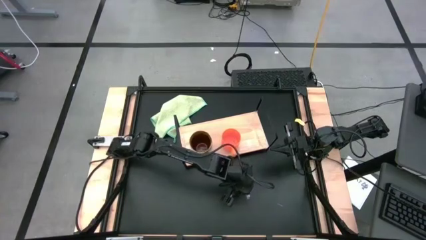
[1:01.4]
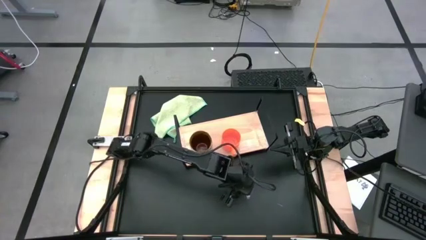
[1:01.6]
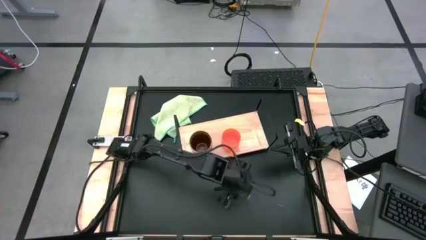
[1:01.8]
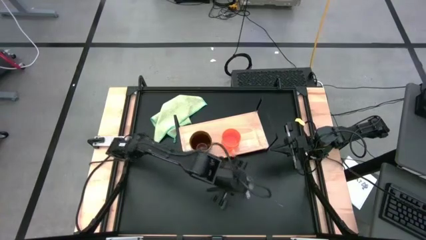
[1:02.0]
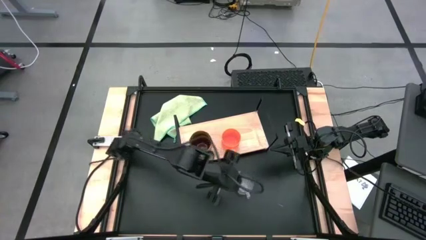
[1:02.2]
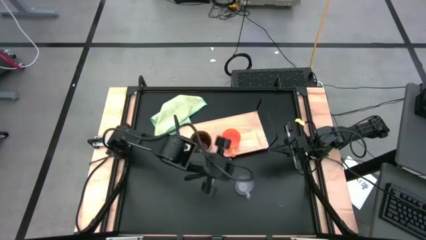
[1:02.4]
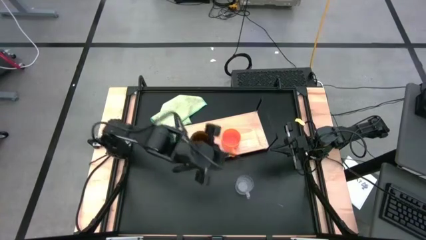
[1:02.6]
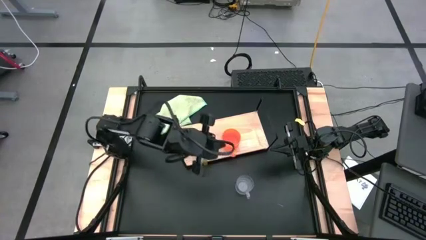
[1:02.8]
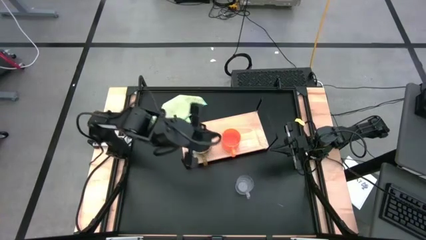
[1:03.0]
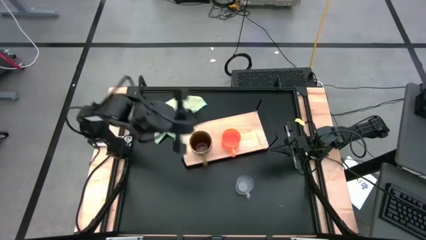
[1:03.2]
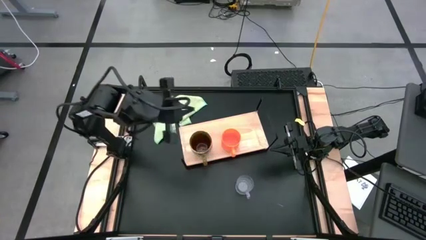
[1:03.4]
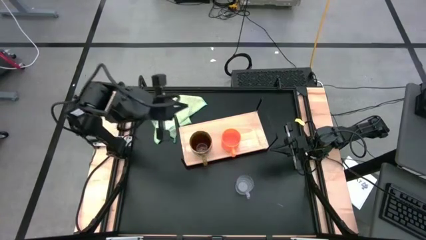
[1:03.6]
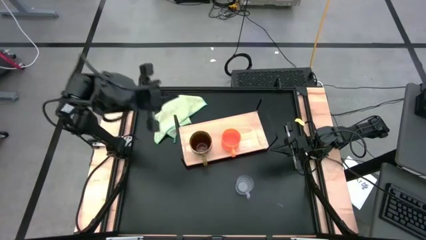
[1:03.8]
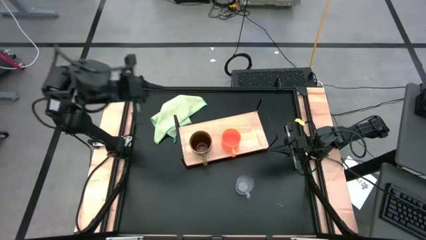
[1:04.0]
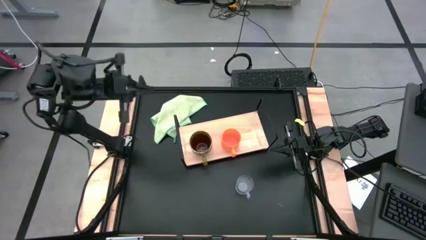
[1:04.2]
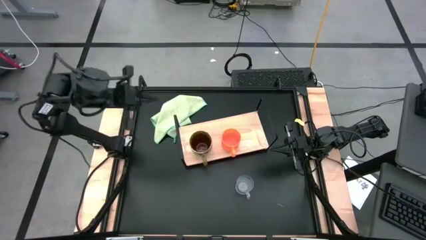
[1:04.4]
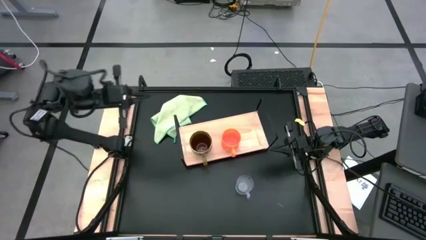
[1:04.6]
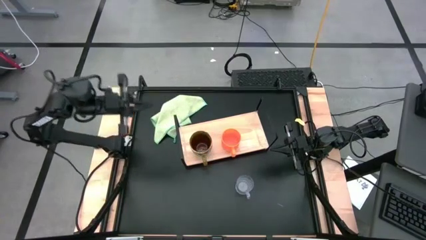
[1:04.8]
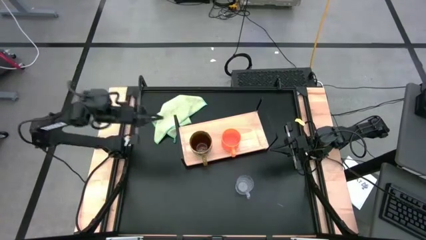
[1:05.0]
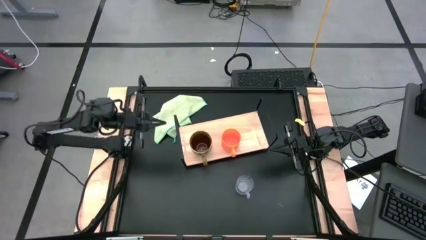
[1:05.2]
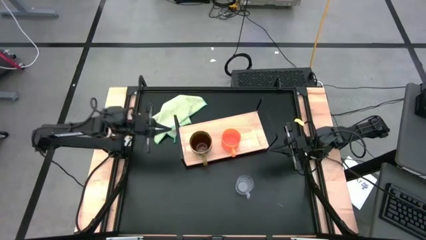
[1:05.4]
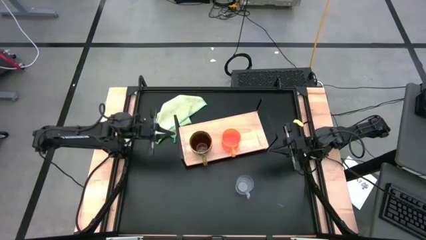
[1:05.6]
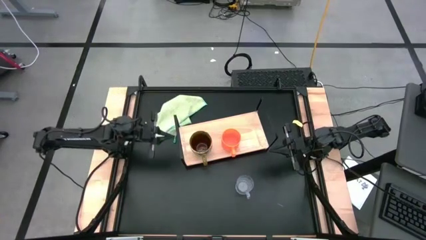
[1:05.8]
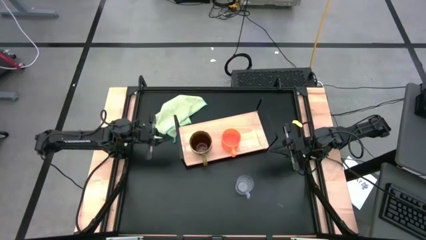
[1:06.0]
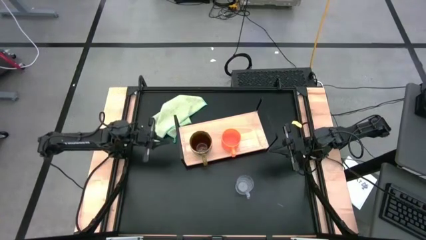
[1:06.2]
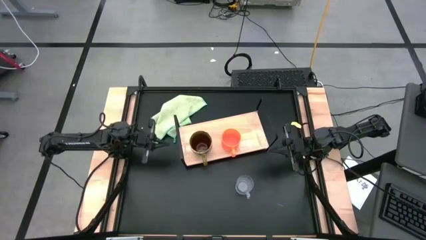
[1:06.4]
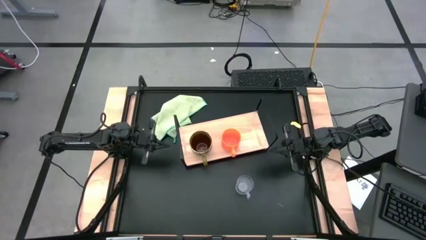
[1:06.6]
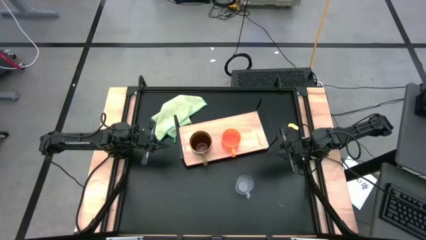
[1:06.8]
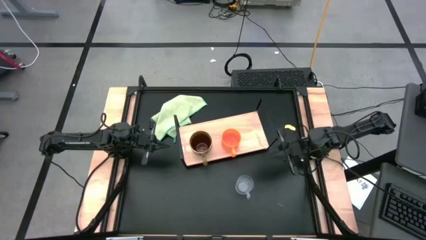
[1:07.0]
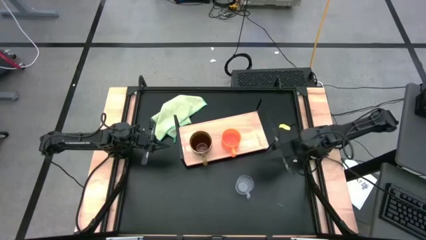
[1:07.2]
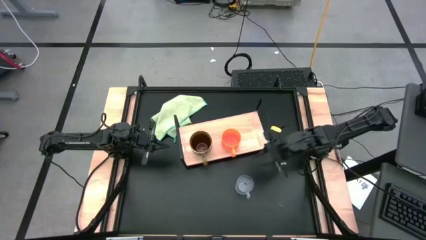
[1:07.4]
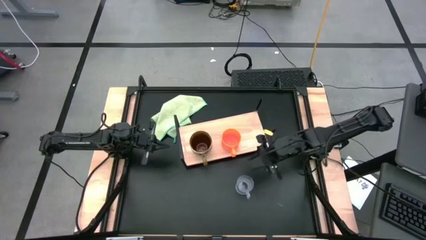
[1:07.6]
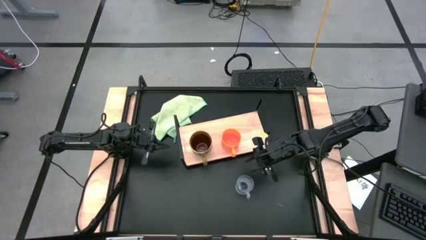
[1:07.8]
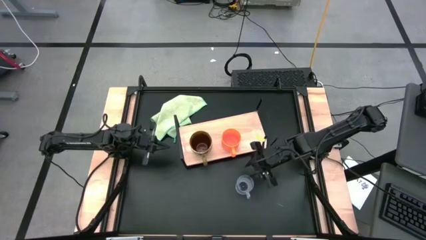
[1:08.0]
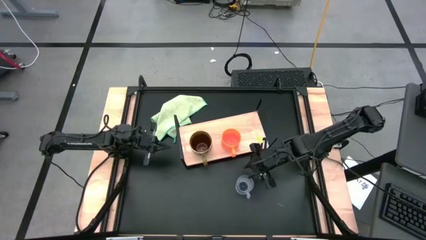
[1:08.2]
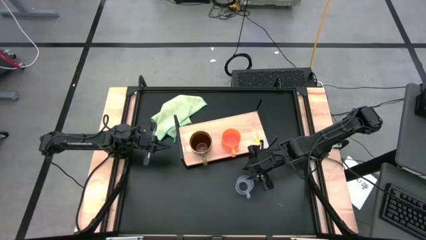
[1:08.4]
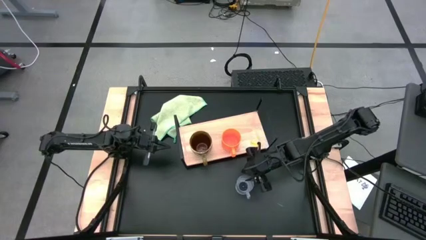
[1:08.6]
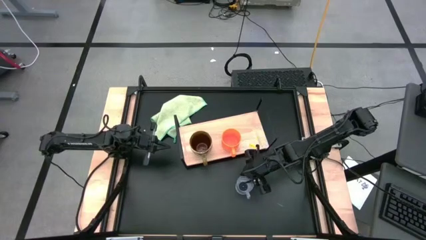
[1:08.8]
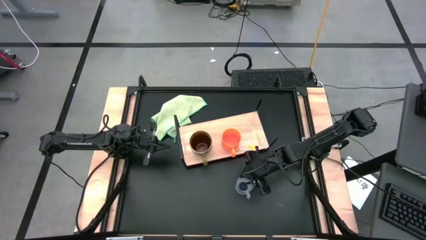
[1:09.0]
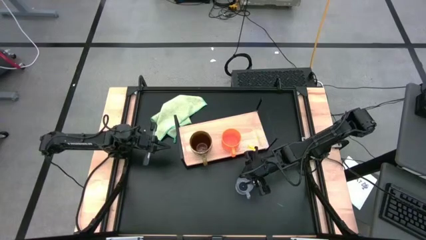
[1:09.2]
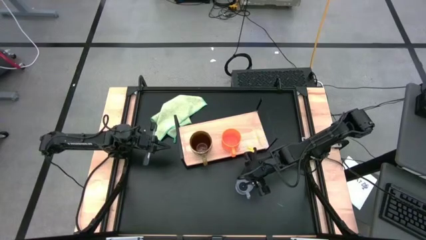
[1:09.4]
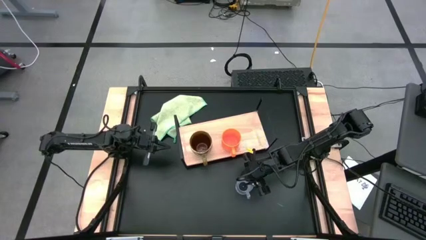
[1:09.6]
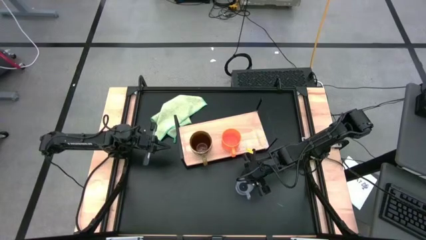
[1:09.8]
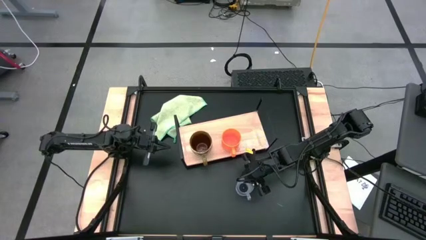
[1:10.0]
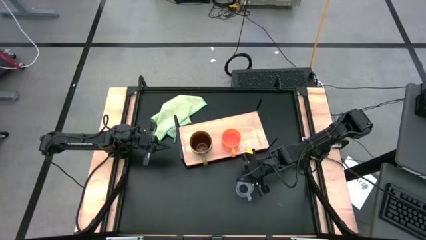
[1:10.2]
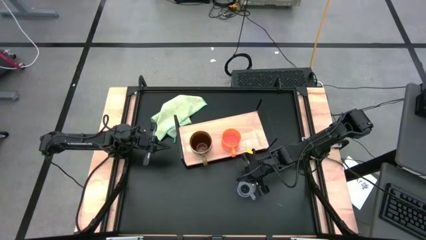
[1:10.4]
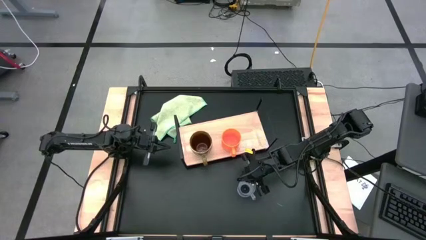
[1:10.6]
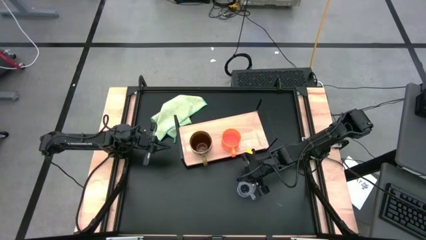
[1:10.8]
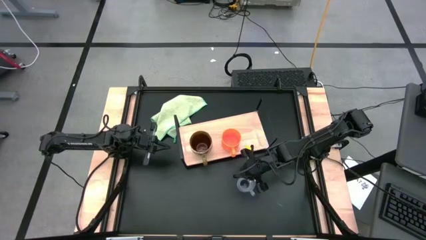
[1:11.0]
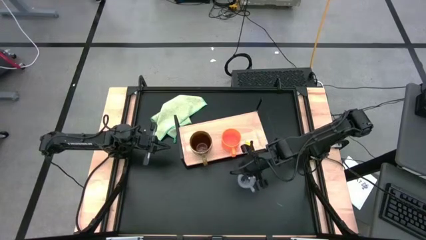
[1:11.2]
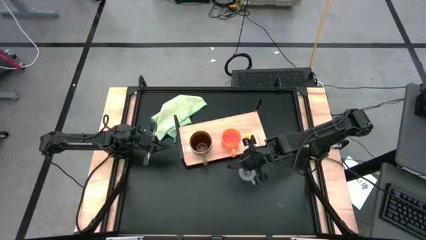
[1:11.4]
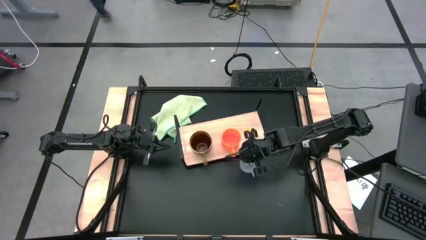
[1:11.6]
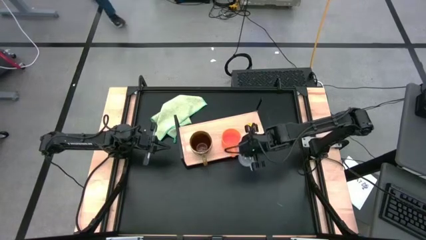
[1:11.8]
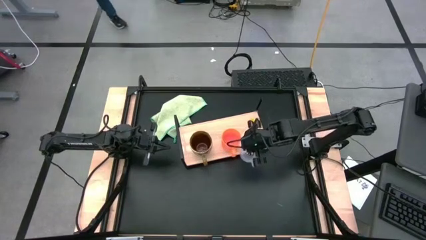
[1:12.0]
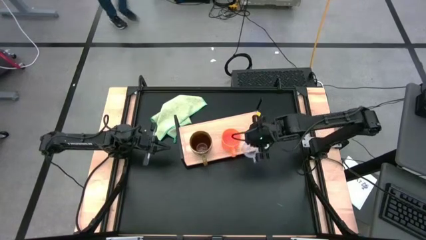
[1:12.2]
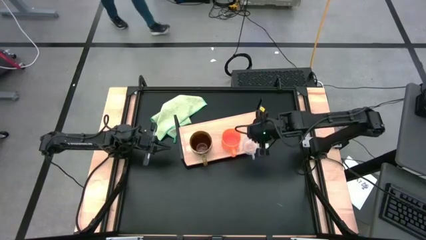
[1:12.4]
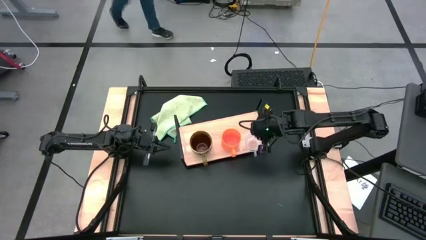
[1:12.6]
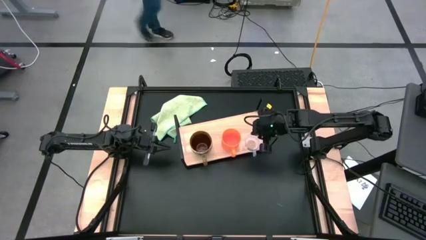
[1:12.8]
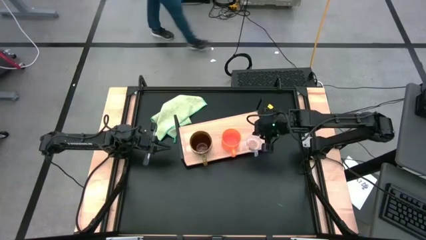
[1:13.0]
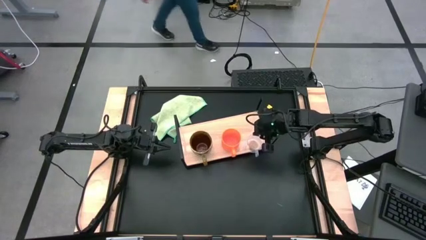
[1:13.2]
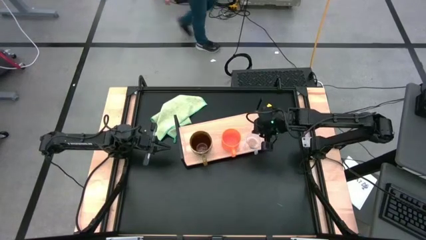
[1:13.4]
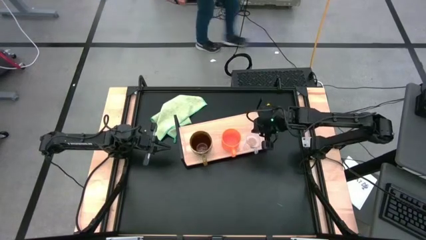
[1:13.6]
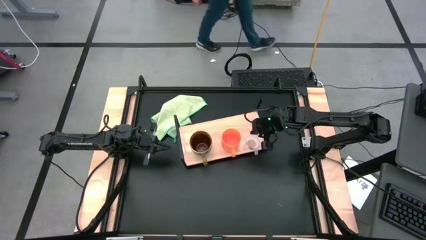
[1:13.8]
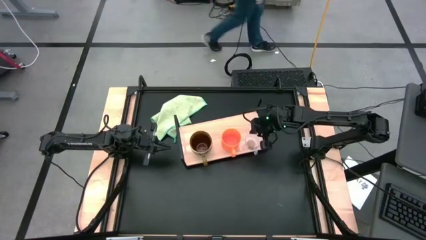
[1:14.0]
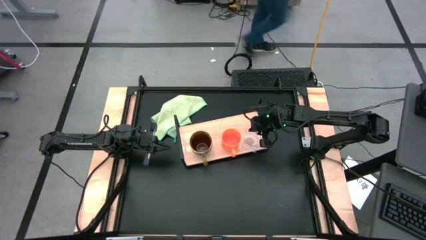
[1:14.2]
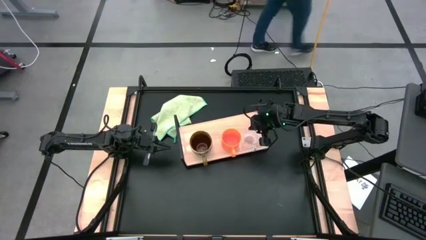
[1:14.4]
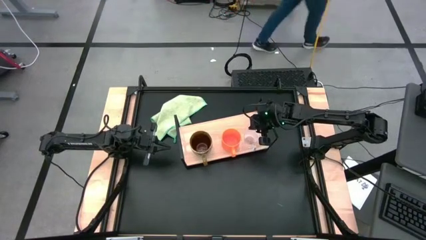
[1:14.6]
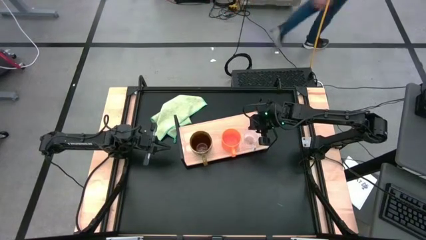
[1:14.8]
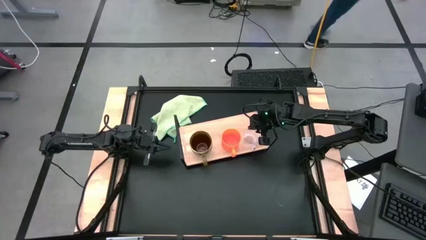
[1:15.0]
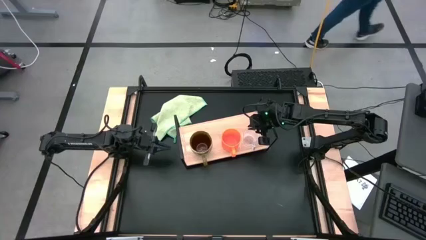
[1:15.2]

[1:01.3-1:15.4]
Task: Stack small to large cups/mugs on shelf
Put the transparent mug on the shelf

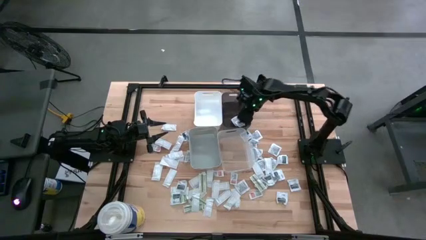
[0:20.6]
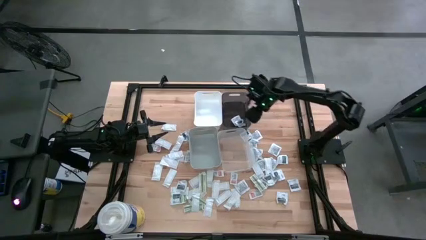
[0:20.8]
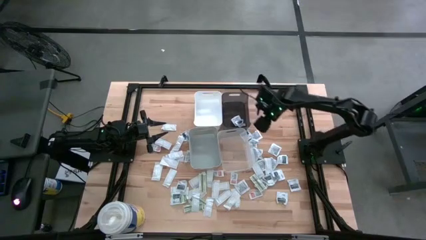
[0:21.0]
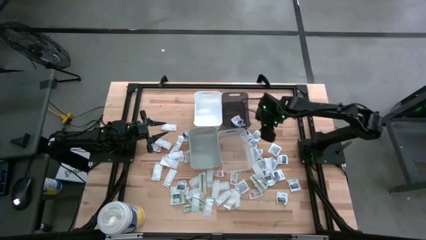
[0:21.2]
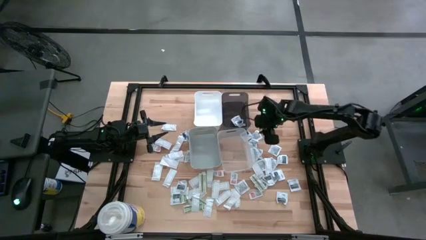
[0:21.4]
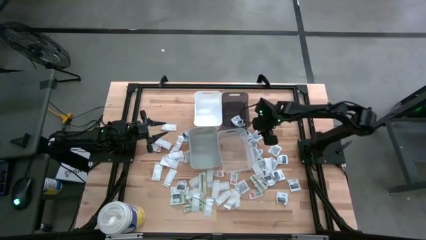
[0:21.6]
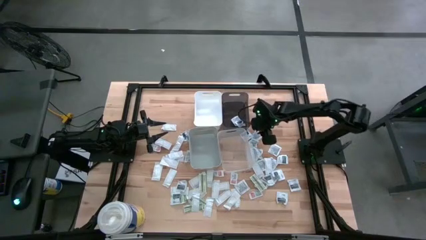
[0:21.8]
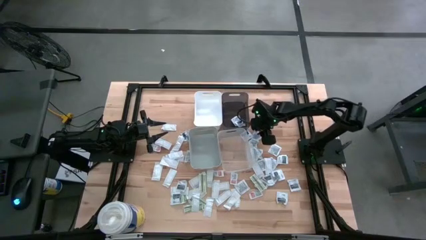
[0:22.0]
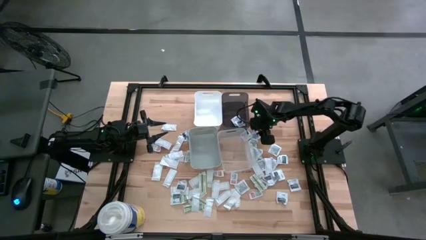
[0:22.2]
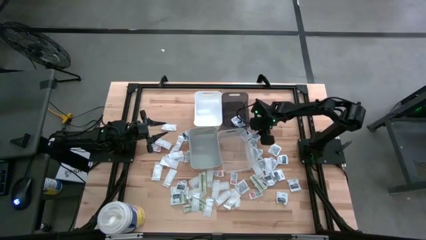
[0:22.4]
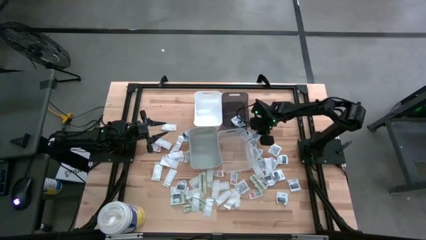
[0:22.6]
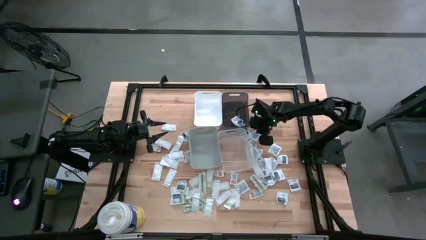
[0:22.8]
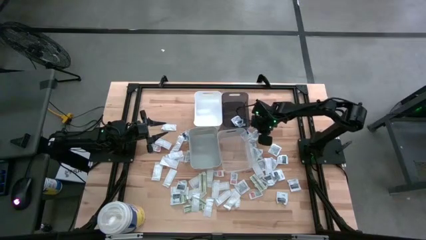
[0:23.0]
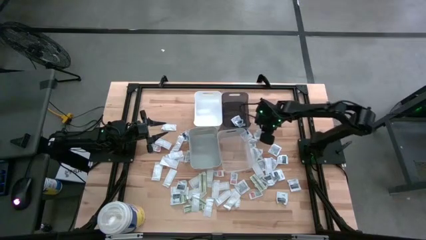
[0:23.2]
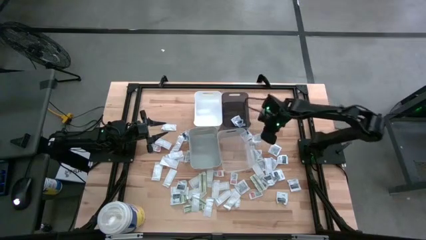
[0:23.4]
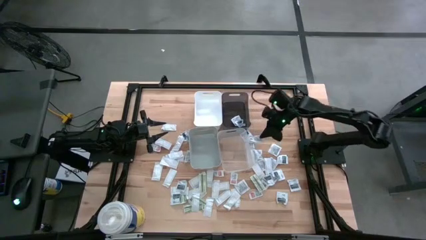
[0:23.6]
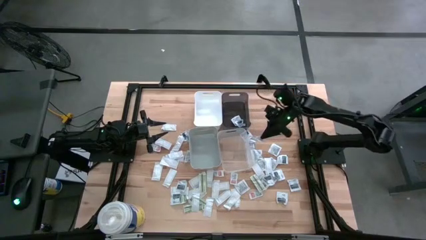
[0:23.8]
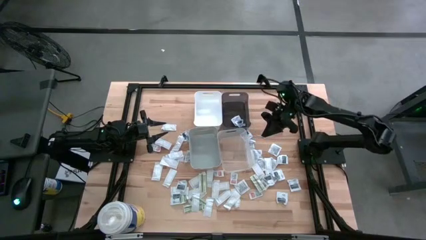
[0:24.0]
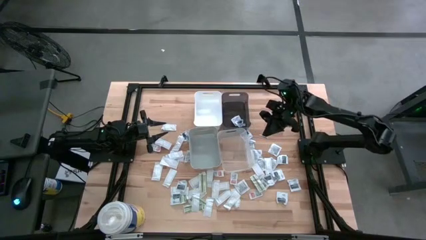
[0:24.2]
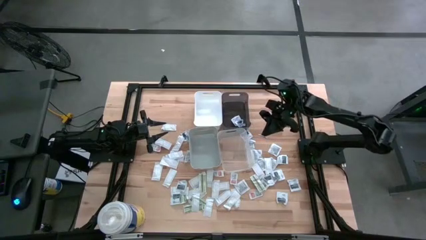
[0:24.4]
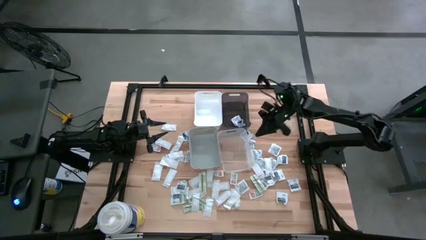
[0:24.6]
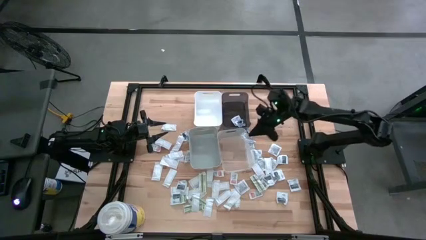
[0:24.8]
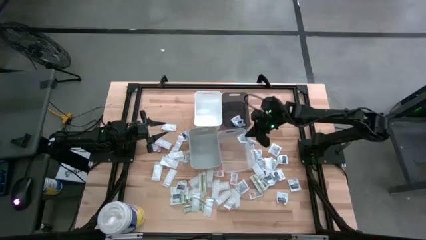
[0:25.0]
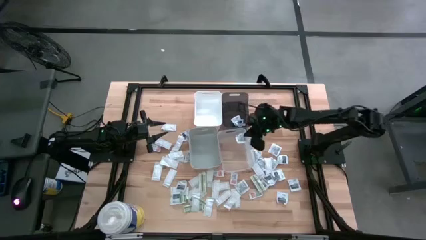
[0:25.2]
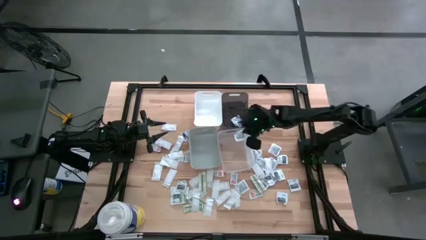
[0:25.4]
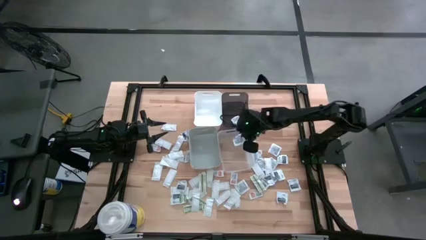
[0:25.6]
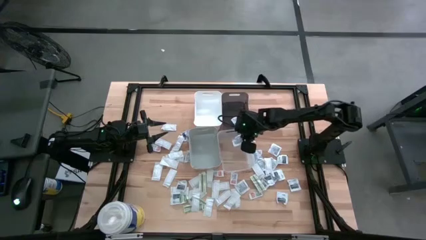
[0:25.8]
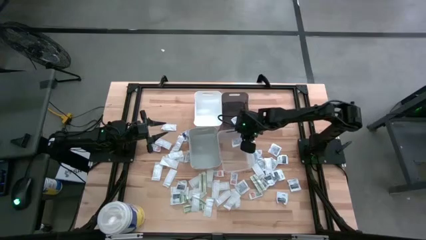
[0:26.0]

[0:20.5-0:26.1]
Task: Pick & Place First Aid Supplies
Put the gray towelette pack into the transparent bin
